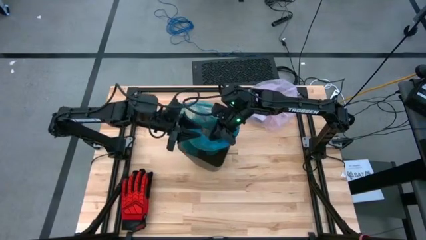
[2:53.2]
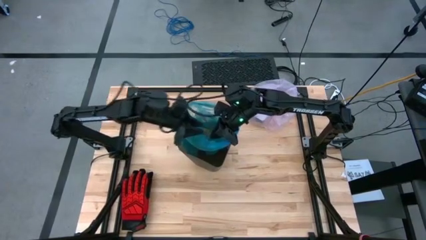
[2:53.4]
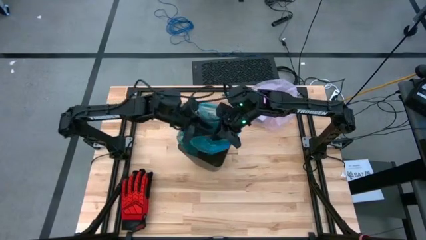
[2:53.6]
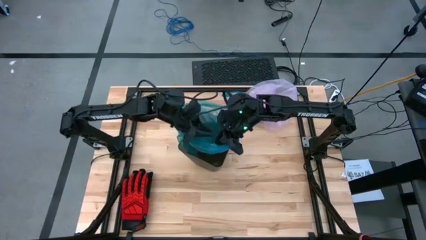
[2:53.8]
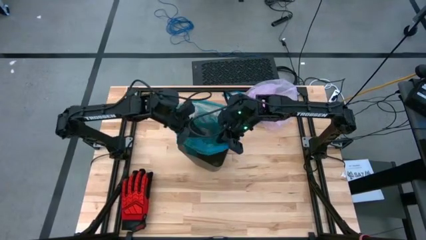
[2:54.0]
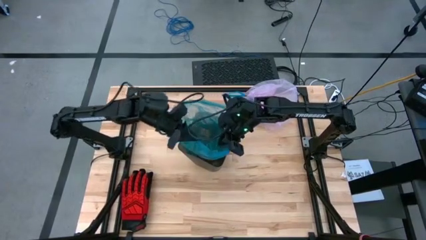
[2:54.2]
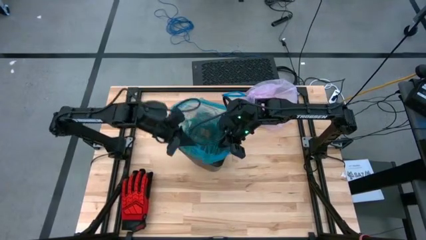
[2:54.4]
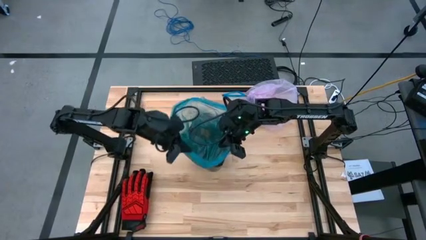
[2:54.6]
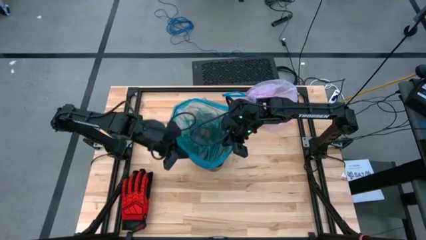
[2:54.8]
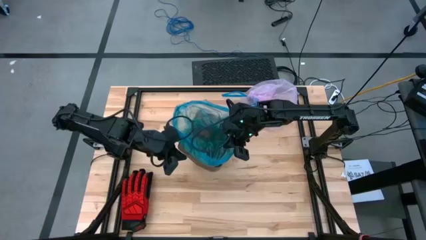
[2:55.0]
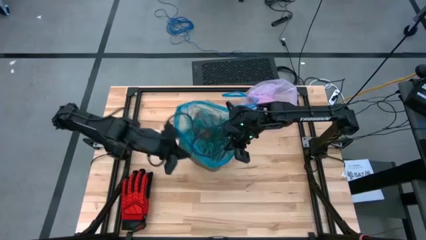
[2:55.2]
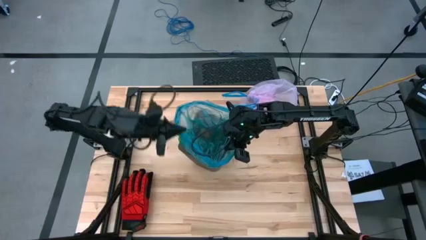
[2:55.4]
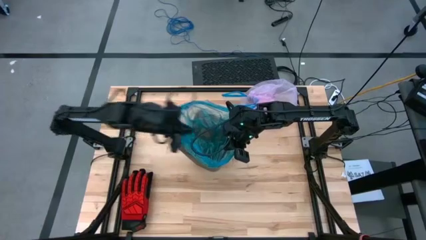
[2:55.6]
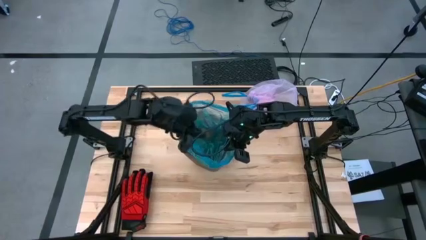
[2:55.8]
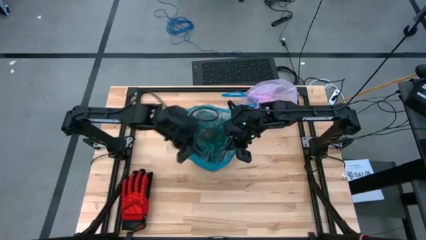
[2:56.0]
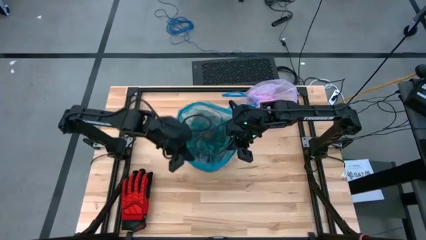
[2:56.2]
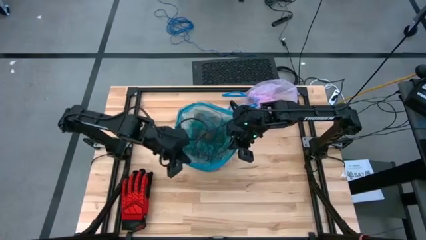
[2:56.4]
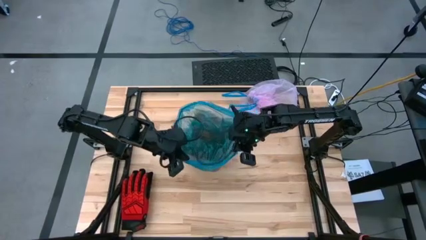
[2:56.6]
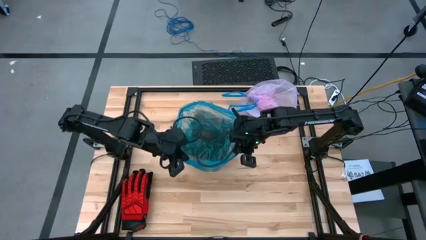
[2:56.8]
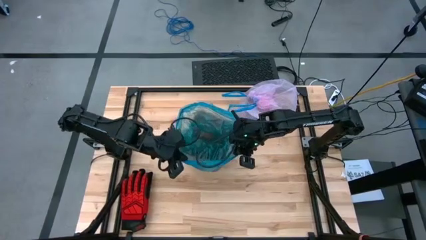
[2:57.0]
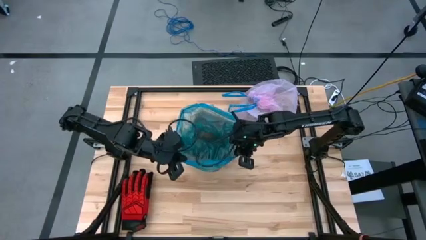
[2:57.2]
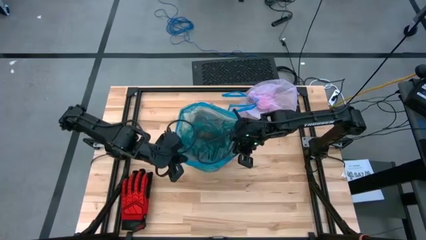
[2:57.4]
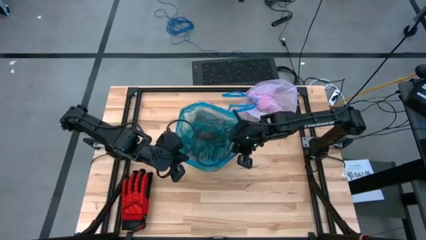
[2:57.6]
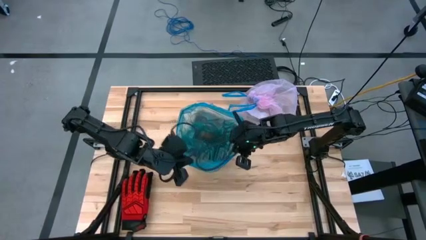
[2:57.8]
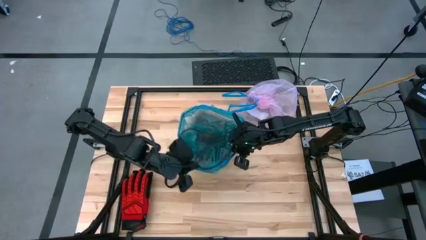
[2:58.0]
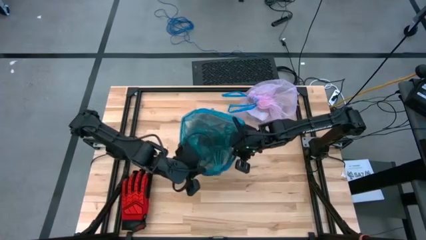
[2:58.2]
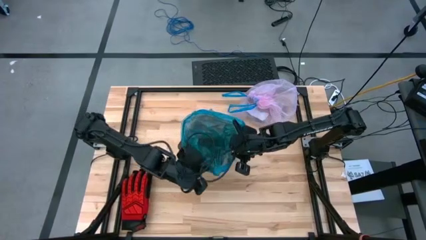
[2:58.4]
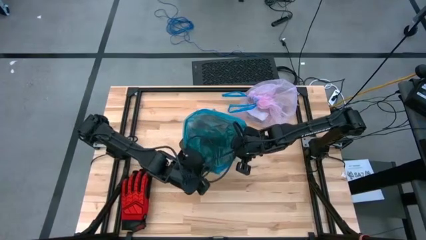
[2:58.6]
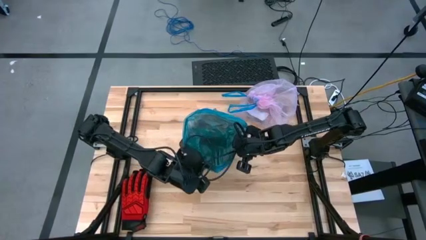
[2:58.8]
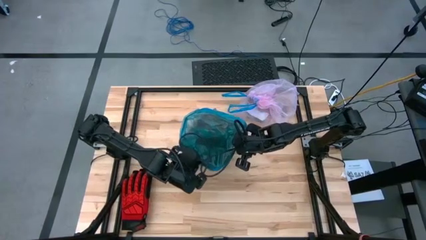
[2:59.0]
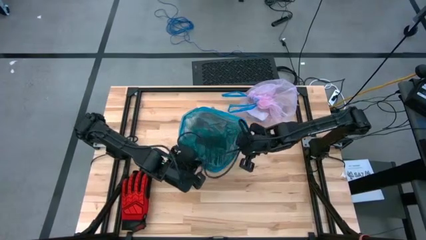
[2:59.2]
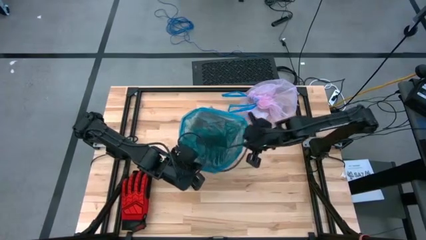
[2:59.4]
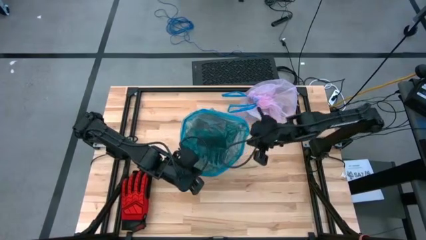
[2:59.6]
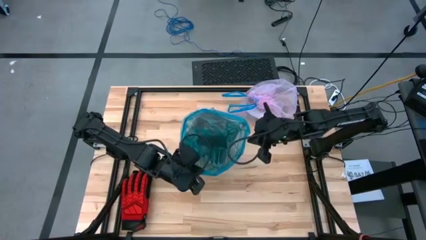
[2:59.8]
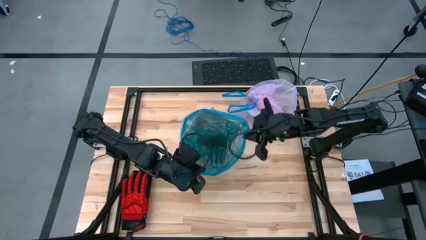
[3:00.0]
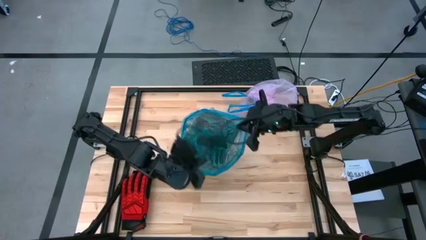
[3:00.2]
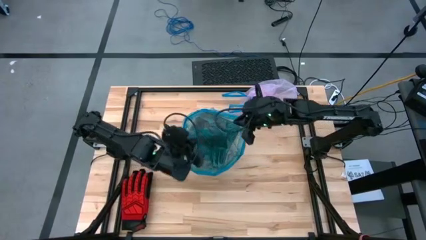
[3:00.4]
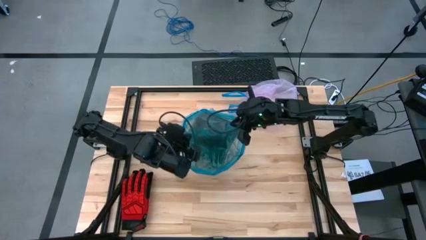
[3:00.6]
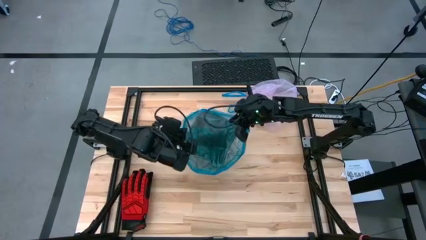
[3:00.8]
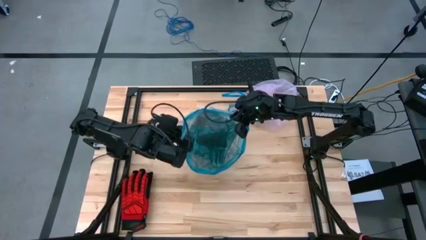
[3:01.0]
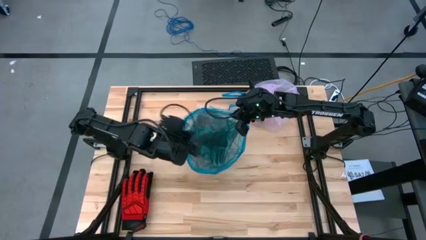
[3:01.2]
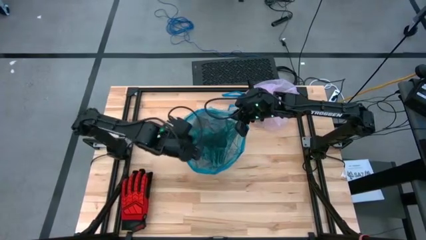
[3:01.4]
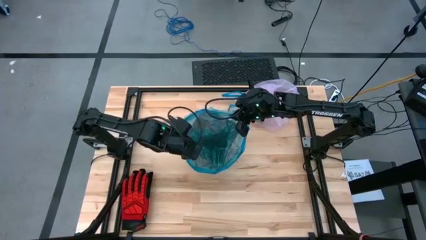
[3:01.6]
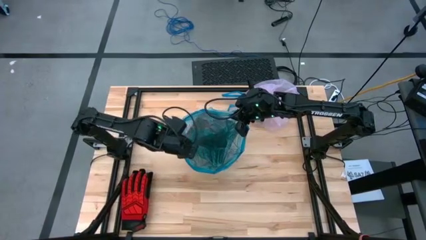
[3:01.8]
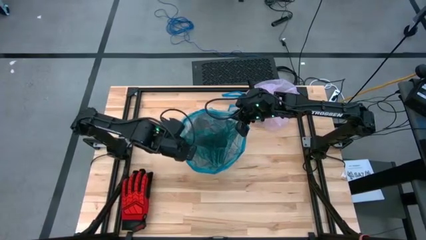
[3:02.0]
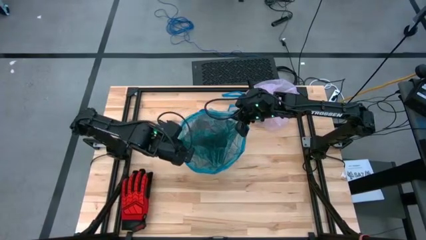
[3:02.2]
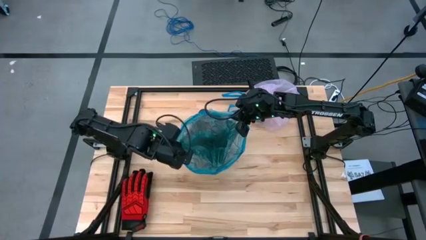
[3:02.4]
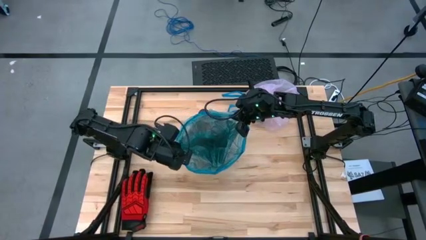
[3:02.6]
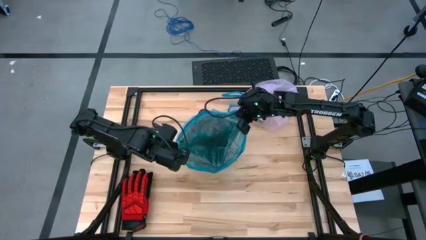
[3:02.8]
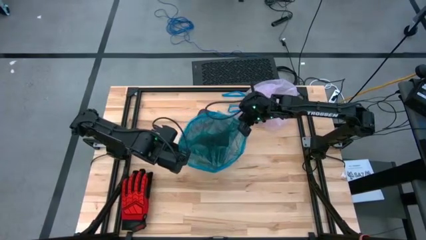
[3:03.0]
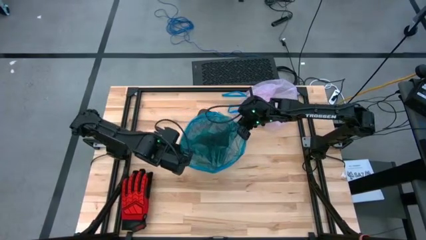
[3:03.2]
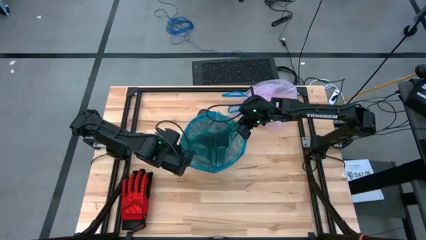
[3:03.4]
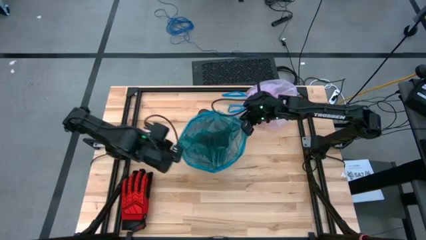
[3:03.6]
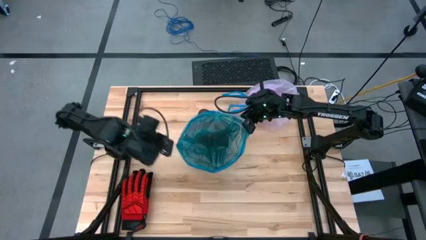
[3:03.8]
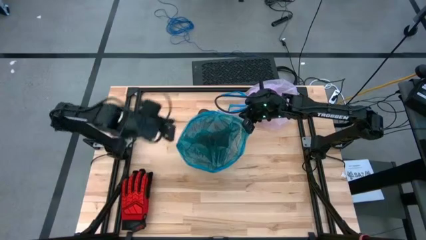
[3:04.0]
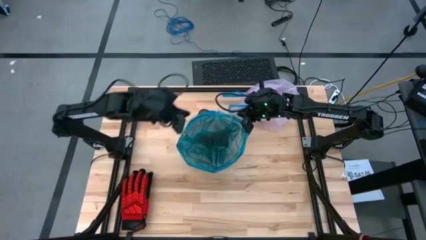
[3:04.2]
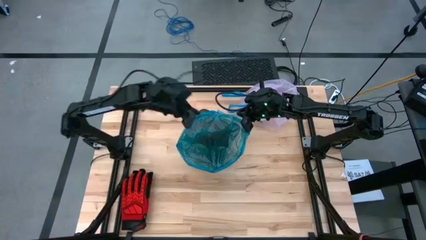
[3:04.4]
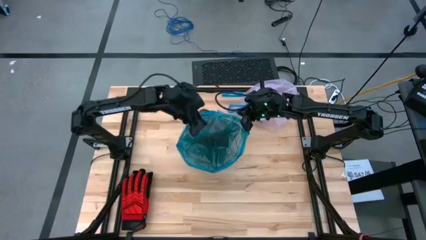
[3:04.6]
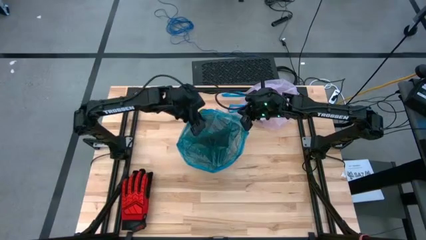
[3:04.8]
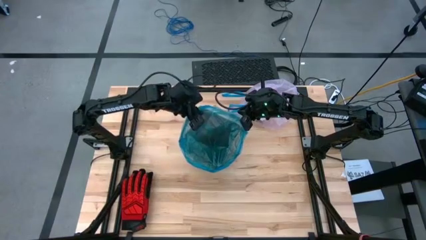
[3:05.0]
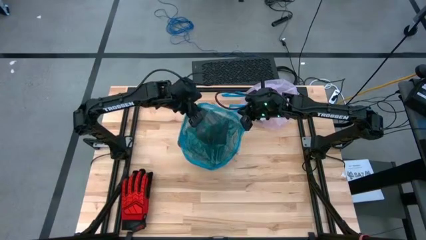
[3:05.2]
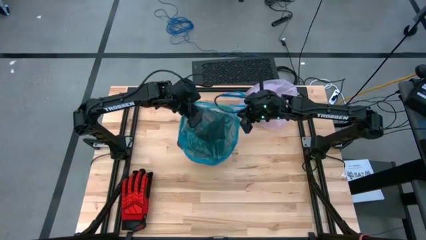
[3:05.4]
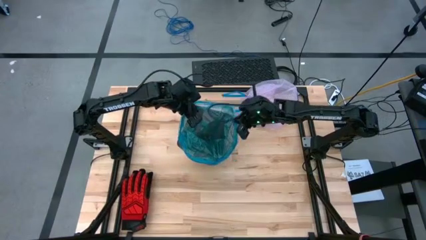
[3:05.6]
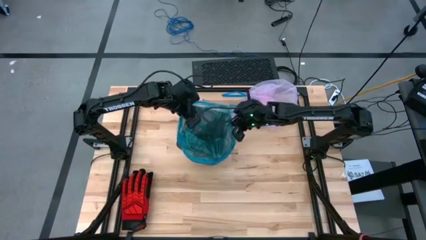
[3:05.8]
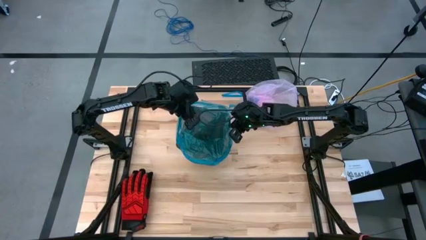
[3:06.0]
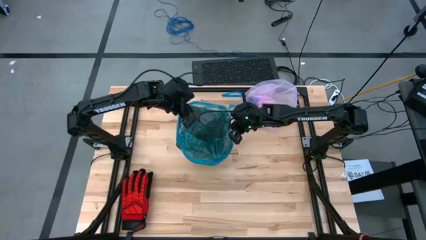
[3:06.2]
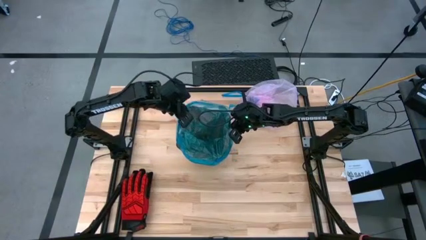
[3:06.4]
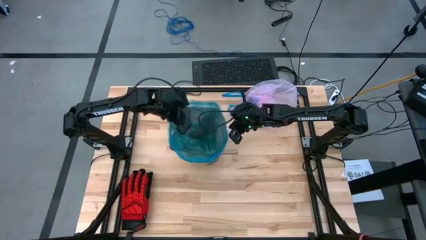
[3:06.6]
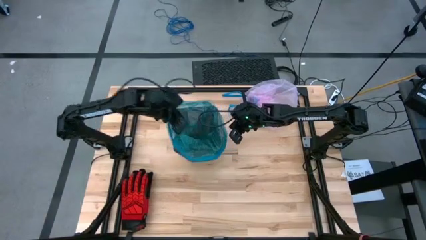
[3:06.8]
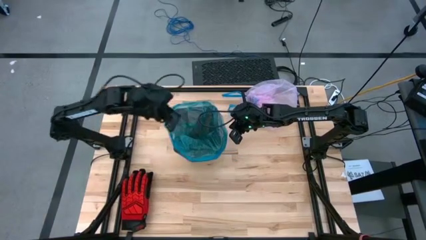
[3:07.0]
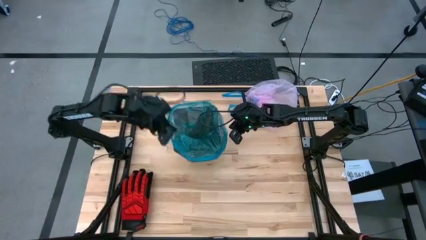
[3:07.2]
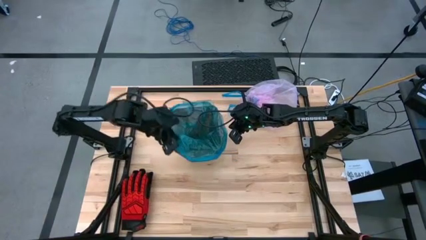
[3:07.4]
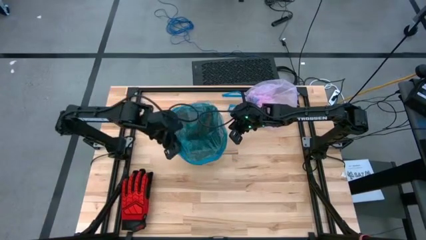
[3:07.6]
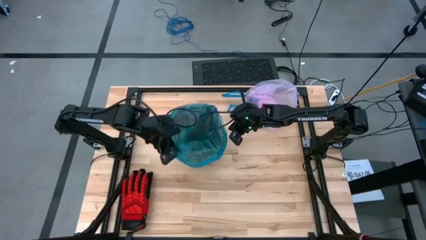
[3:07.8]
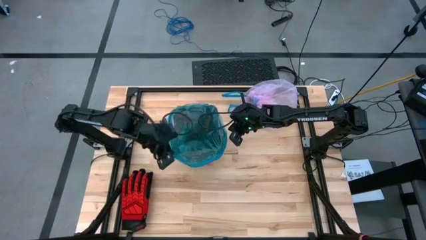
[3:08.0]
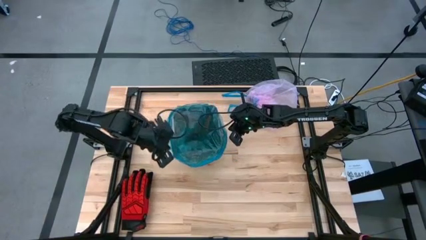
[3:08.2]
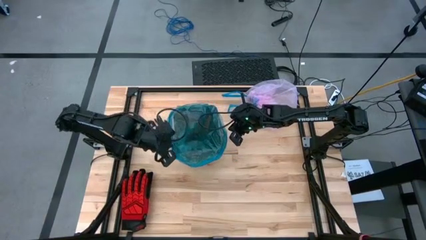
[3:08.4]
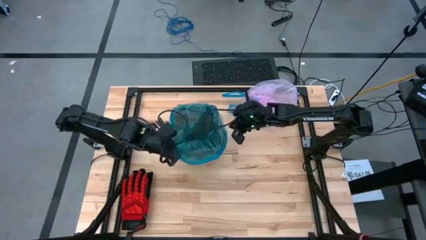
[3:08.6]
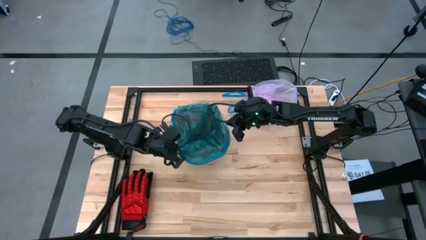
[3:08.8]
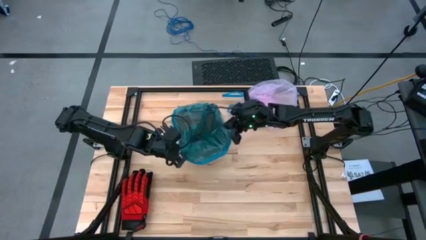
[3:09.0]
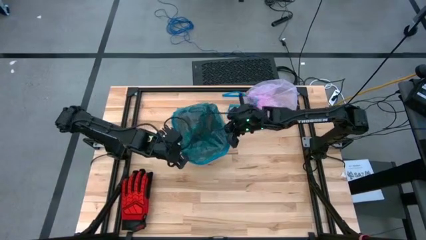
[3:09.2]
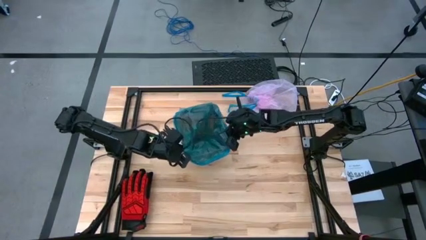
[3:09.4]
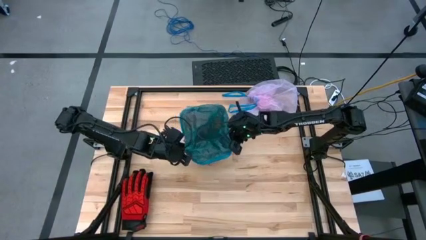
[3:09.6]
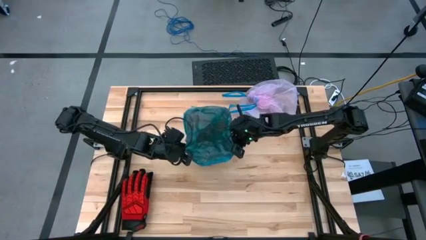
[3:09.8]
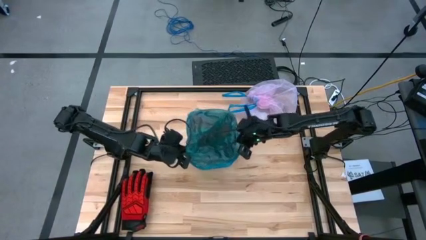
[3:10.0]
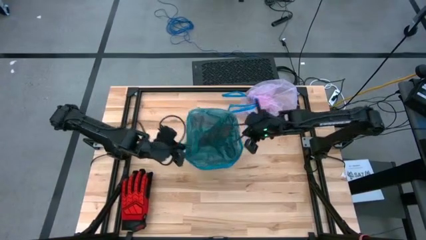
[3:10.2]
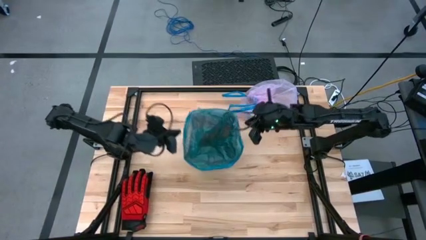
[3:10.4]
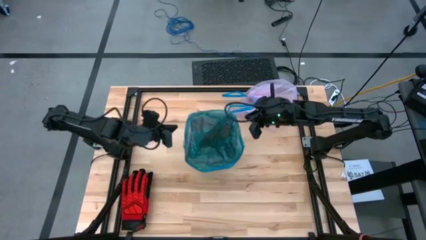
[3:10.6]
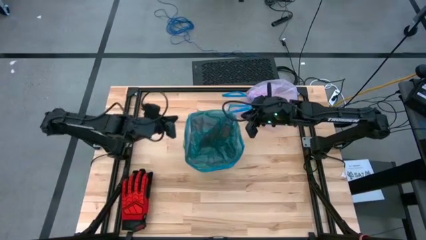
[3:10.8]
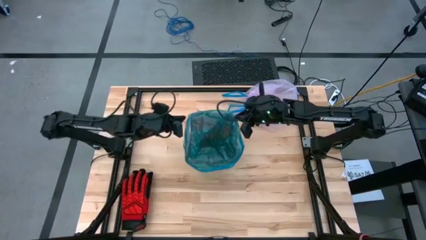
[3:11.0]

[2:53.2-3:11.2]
Task: place trash/remove bag and relplace
Insert the blue trash bag into the trash bin
